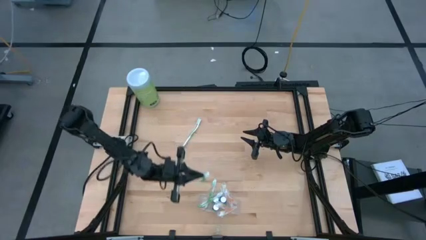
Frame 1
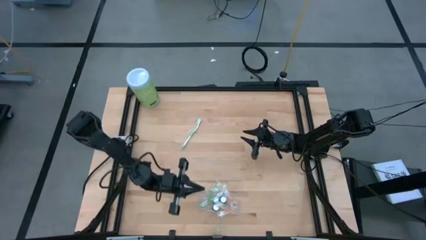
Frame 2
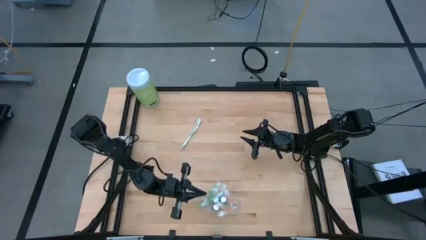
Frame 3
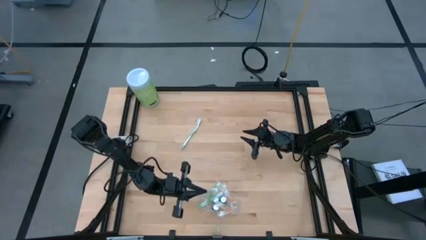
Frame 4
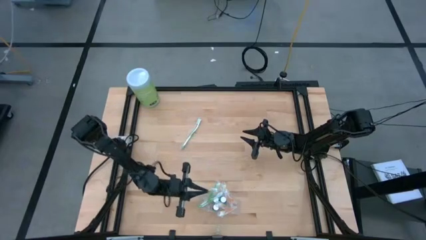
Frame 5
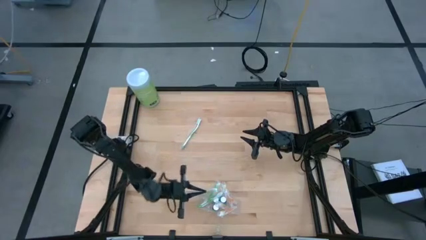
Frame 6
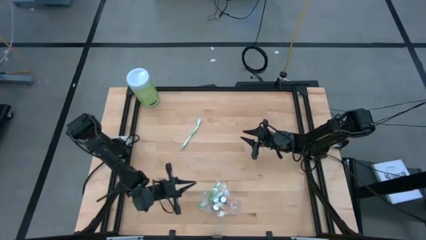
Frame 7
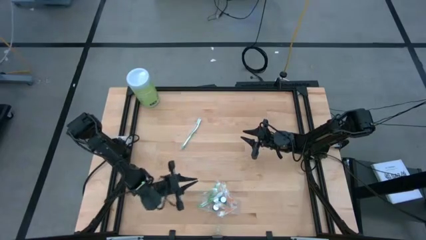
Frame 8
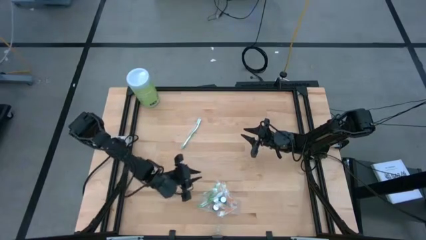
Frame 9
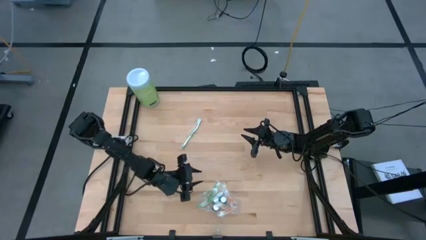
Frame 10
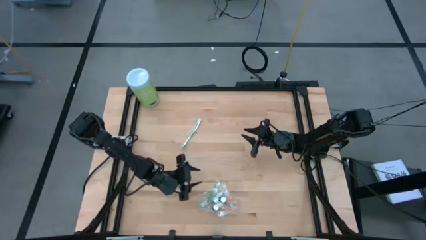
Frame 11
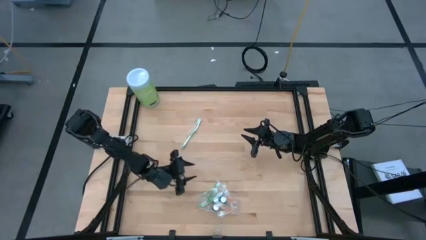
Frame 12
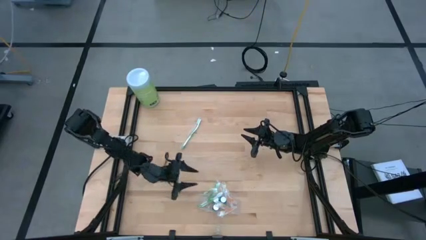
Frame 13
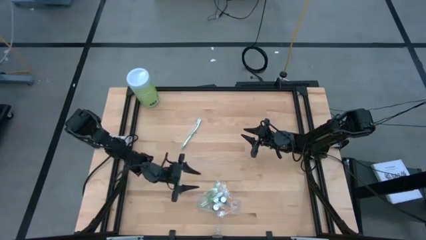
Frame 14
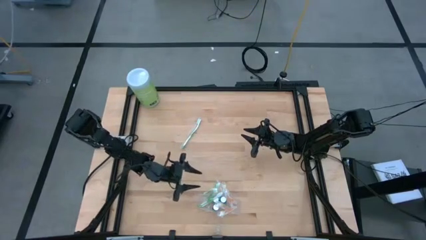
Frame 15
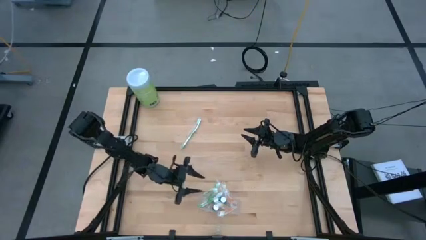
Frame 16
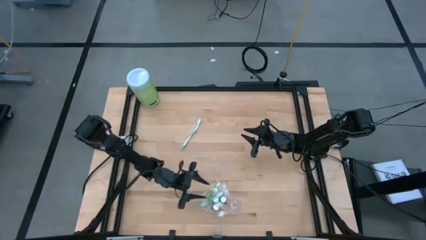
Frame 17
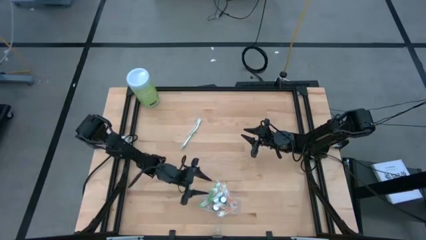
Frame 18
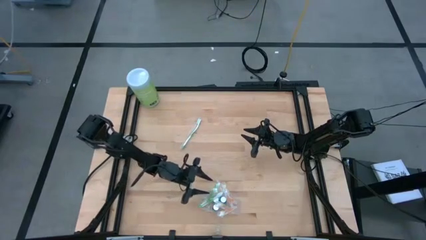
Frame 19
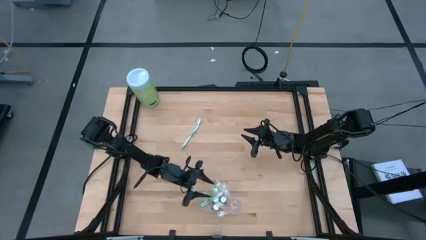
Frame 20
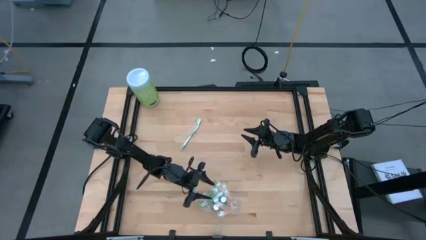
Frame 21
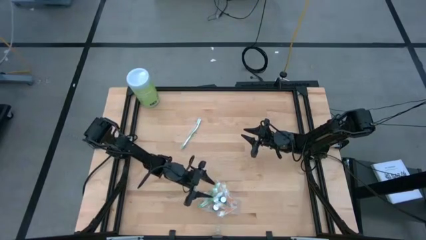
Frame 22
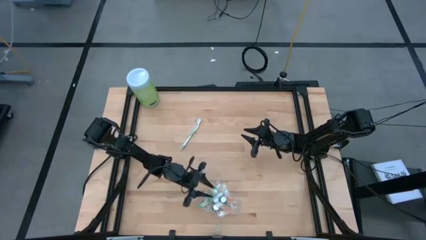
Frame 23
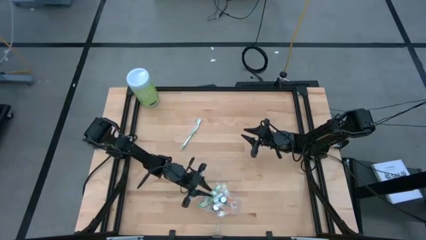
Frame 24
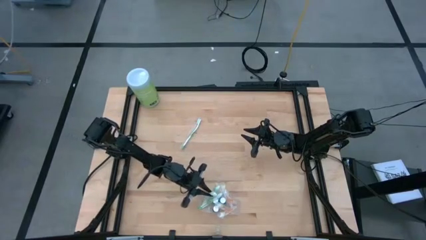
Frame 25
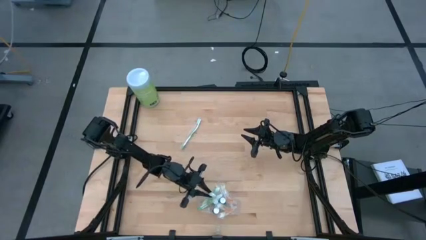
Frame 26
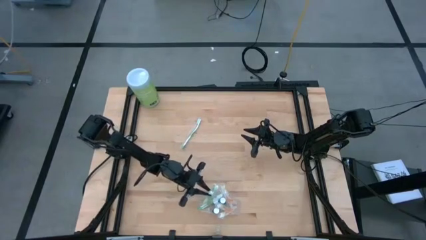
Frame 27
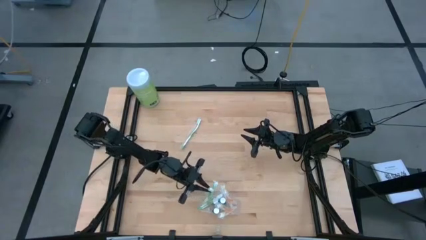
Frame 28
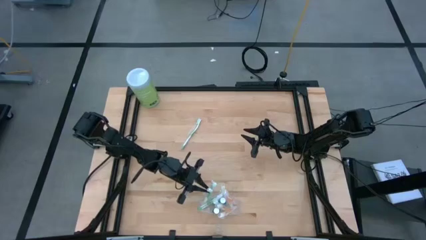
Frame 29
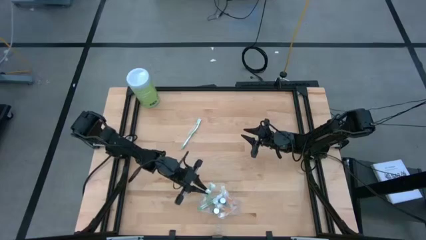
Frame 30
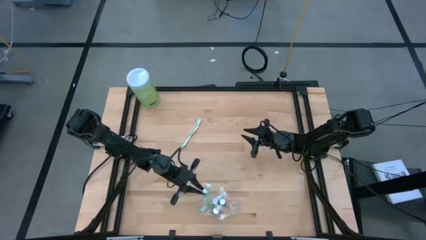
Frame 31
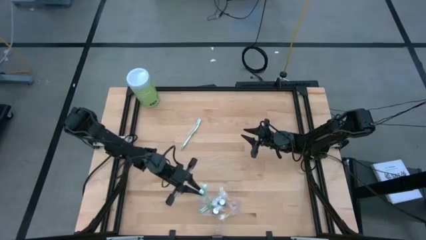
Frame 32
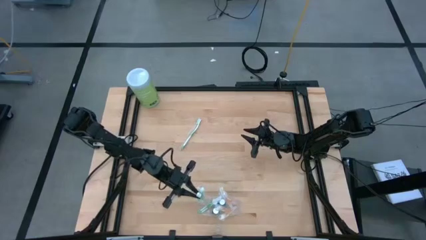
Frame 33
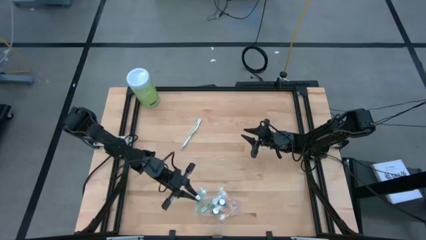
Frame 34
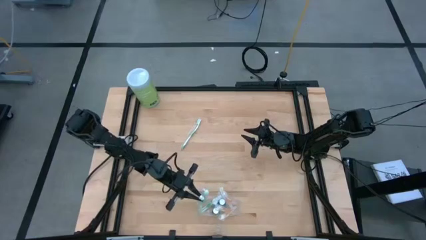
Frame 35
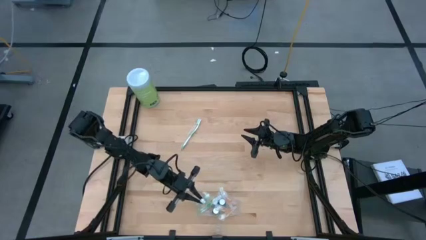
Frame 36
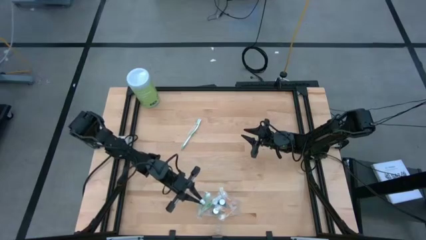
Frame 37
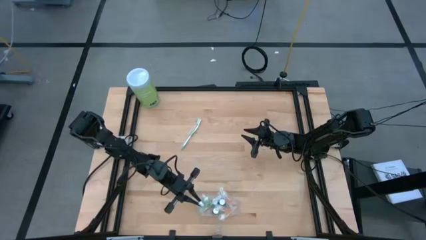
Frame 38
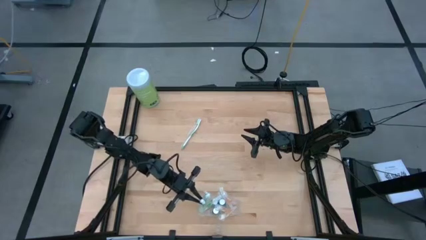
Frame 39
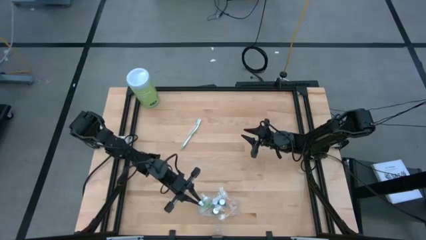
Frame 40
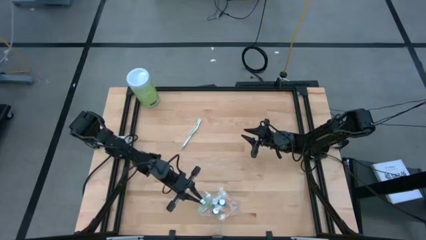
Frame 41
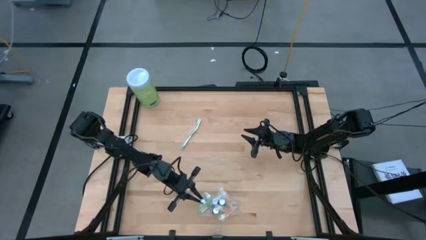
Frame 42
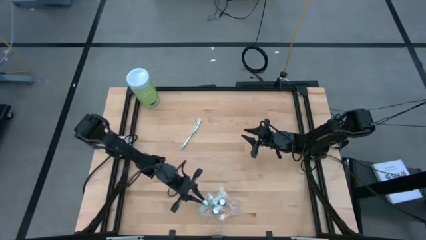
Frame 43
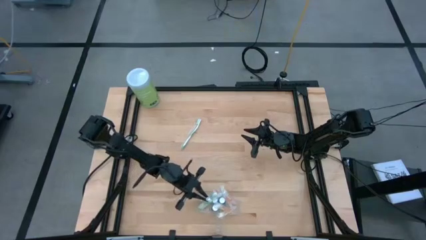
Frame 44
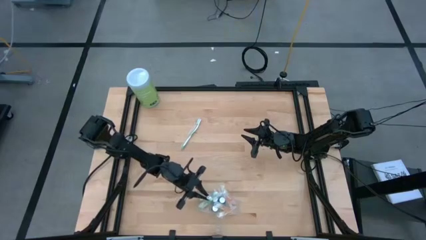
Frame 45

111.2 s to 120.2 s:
Task: Pick & Place toothbrushing station
Put the green toothbrush into the transparent organizer

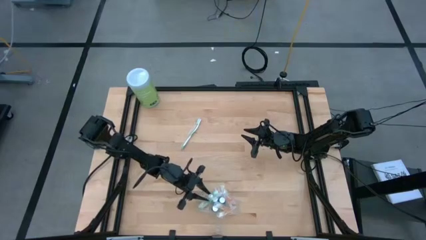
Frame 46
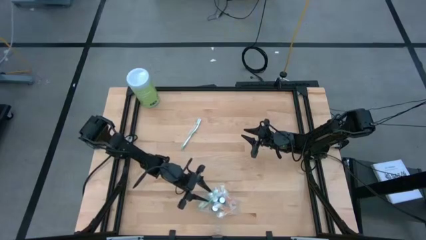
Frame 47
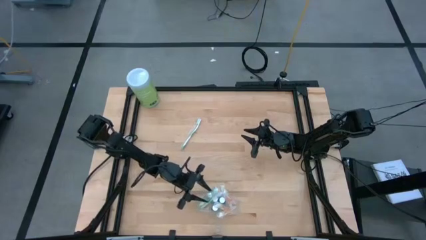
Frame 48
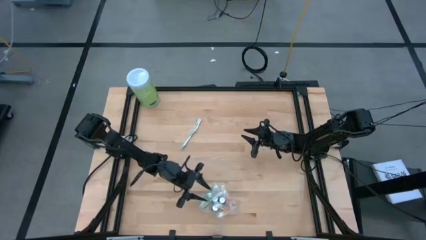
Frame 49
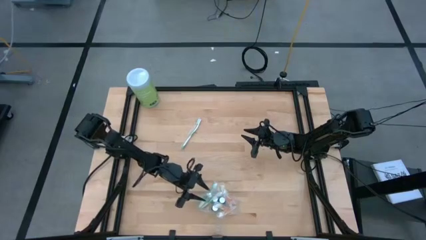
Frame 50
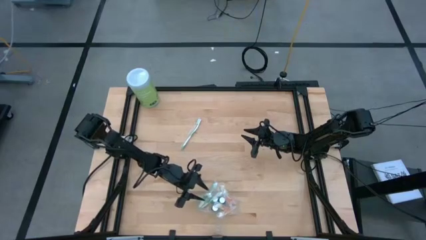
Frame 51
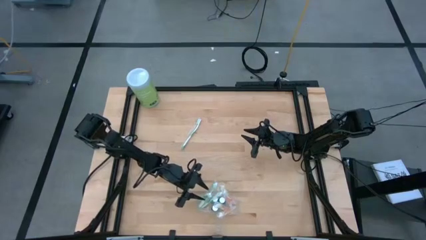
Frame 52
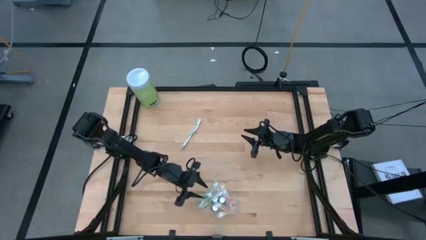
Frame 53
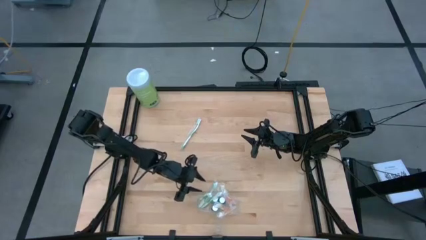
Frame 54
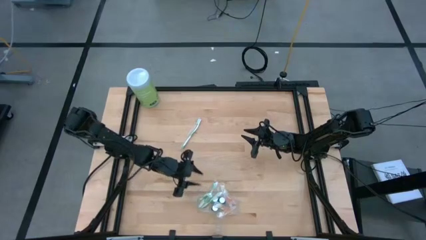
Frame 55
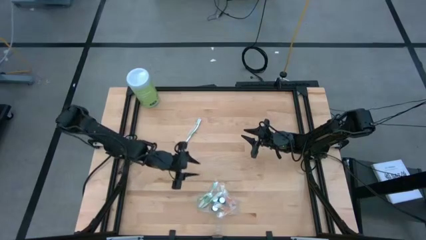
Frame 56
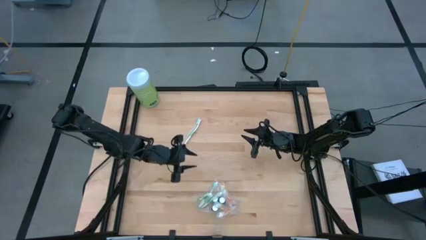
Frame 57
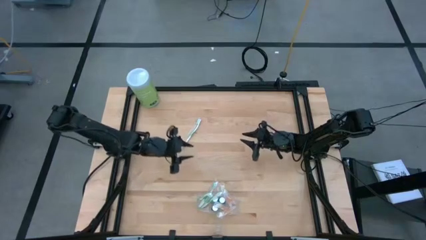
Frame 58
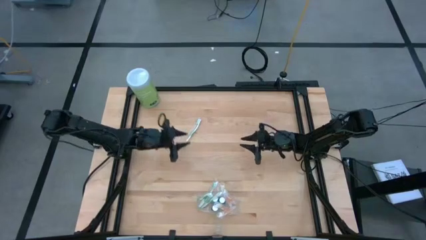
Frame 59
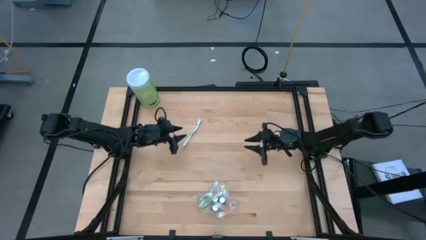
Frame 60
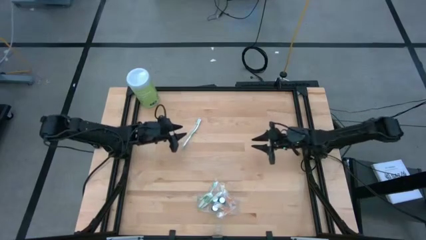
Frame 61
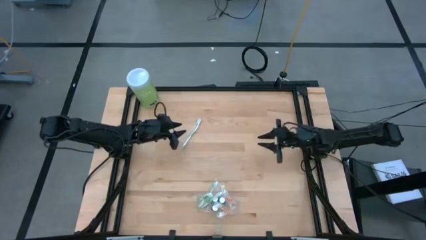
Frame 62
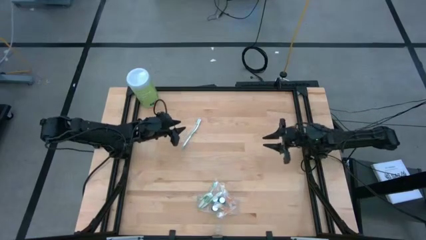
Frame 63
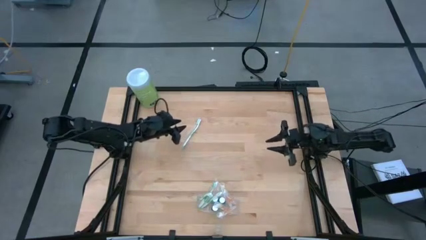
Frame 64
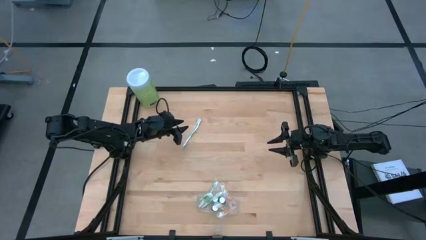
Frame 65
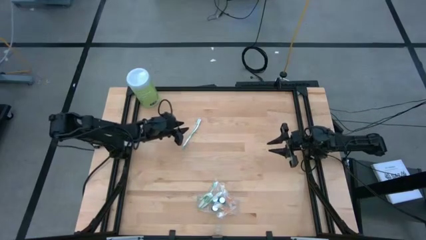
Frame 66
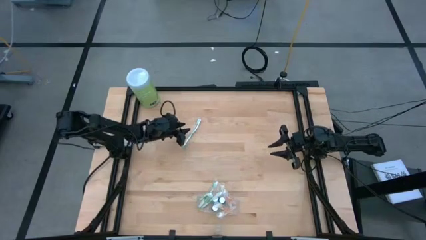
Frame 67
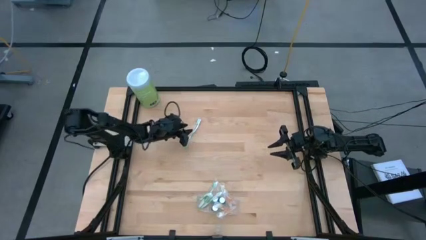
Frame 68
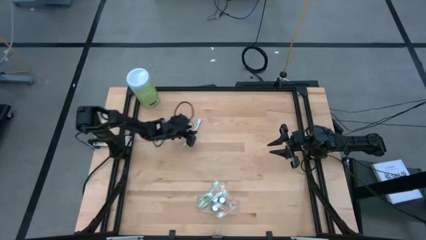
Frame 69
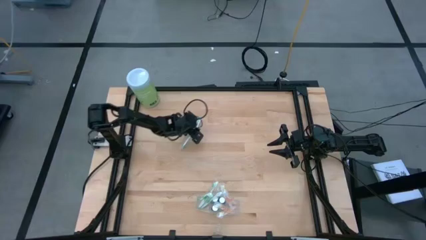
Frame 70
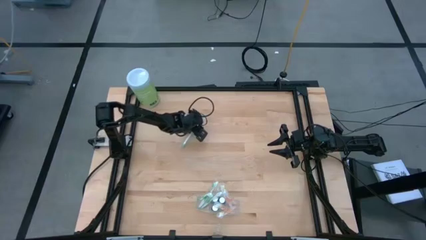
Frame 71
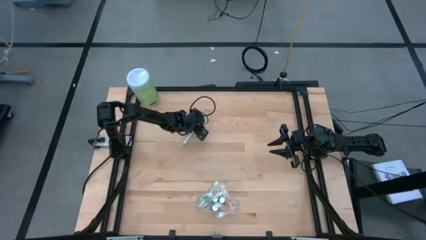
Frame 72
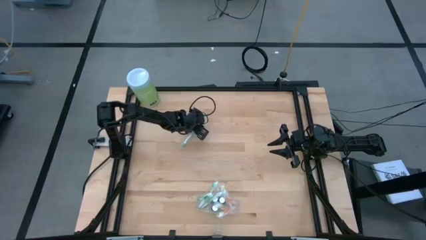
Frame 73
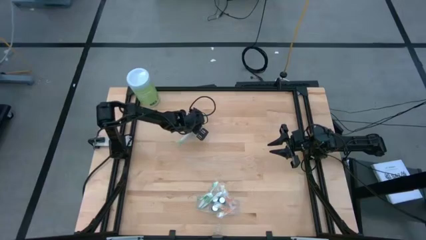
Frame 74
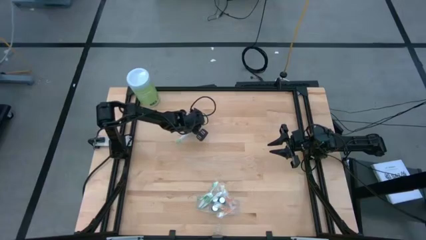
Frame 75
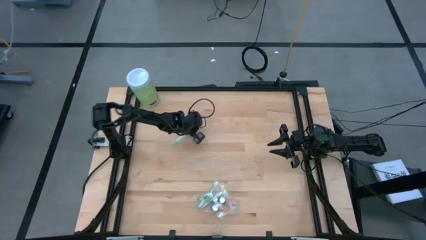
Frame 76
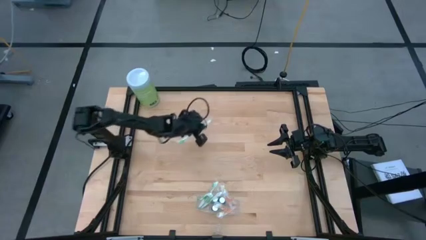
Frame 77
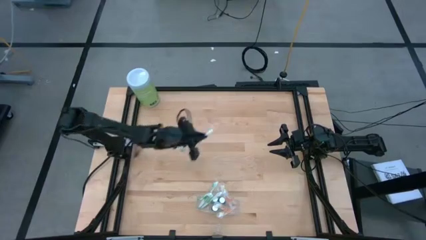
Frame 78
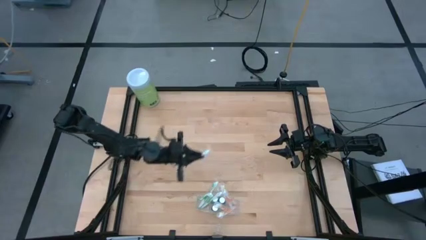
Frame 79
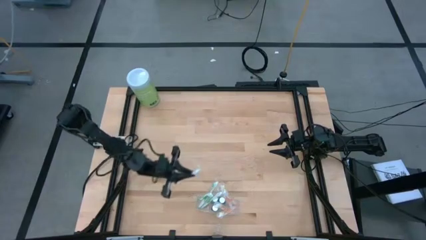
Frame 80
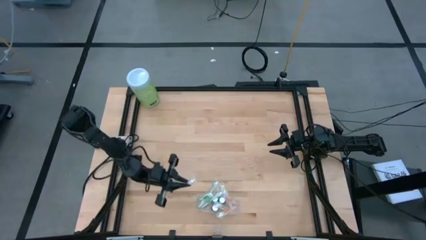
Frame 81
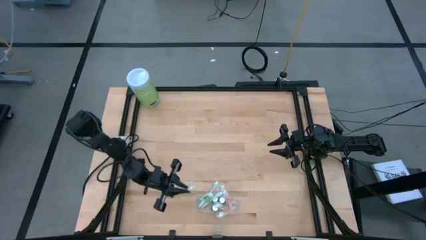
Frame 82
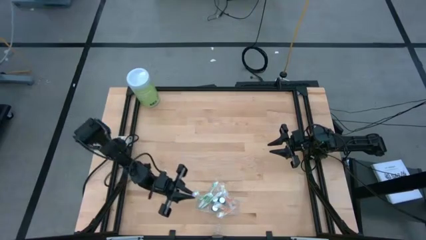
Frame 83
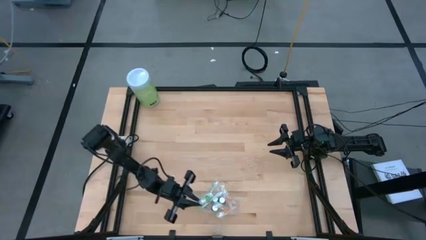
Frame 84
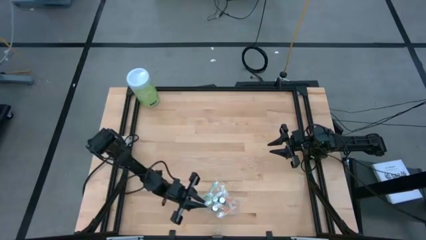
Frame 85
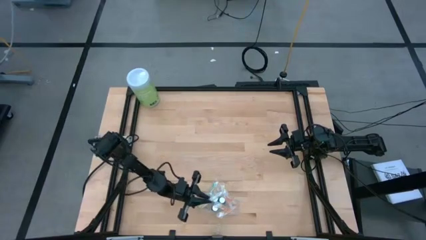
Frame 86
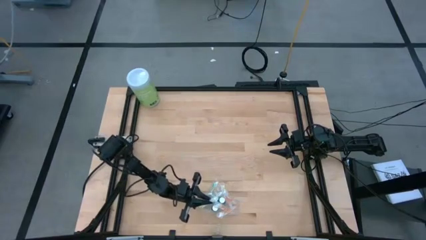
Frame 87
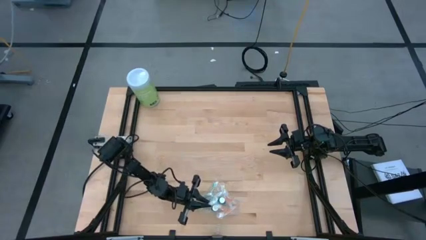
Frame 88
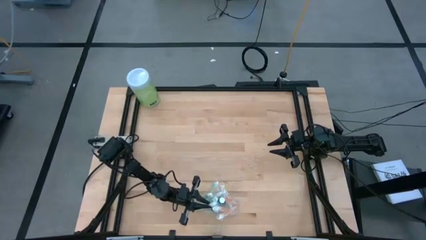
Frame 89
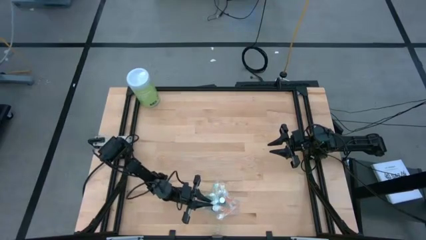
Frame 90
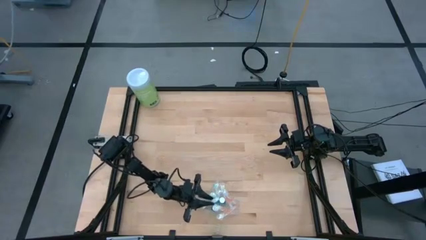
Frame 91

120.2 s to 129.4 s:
Put the green toothbrush into the transparent organizer
